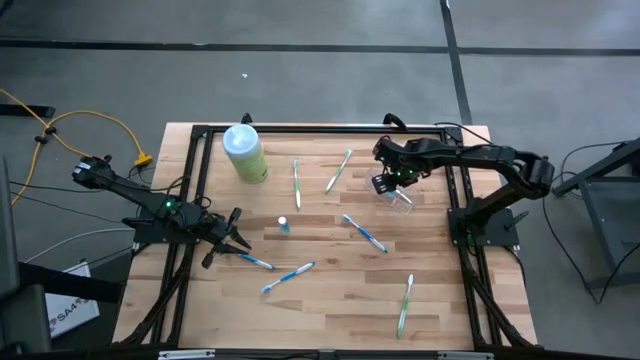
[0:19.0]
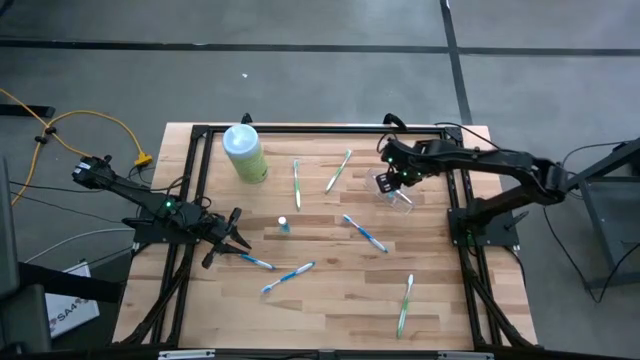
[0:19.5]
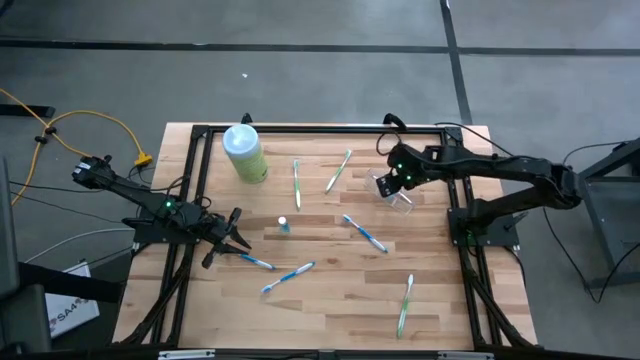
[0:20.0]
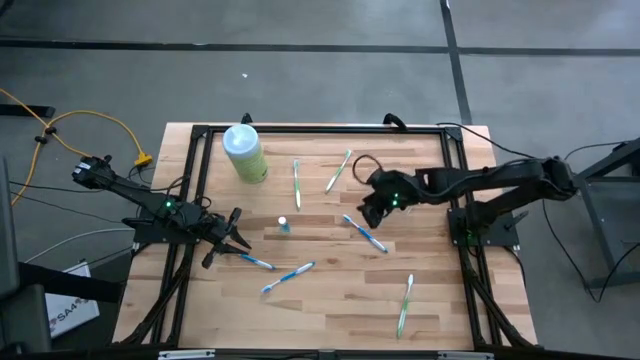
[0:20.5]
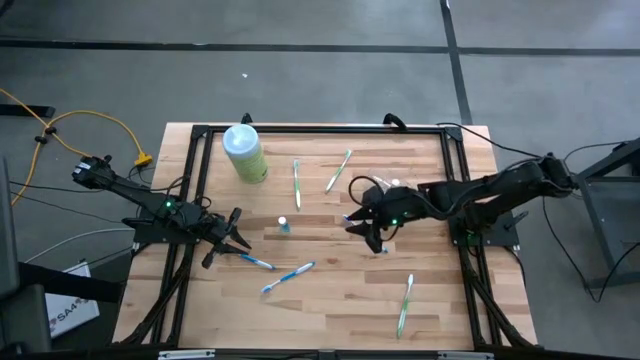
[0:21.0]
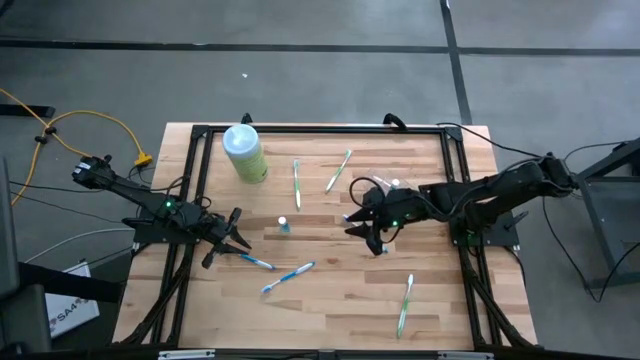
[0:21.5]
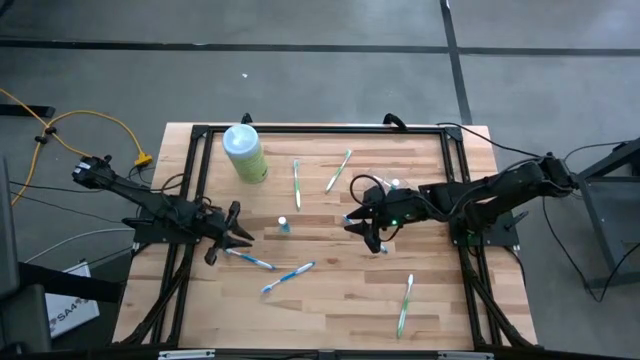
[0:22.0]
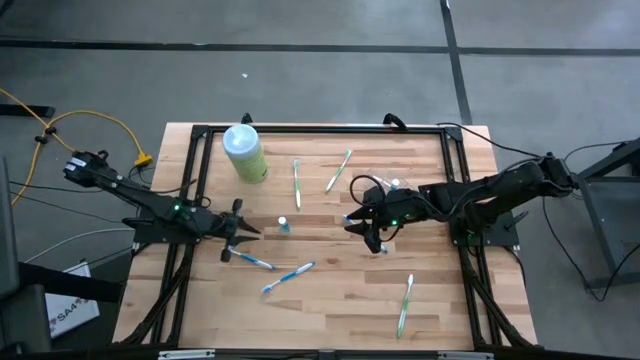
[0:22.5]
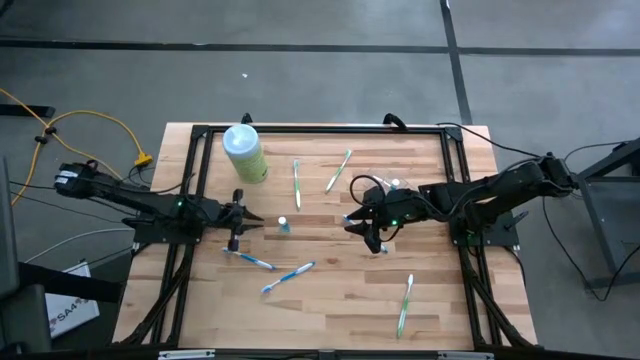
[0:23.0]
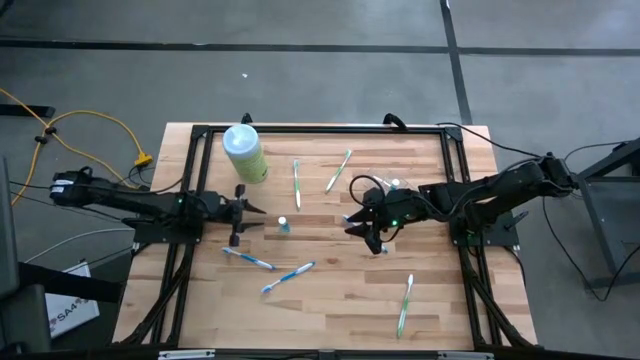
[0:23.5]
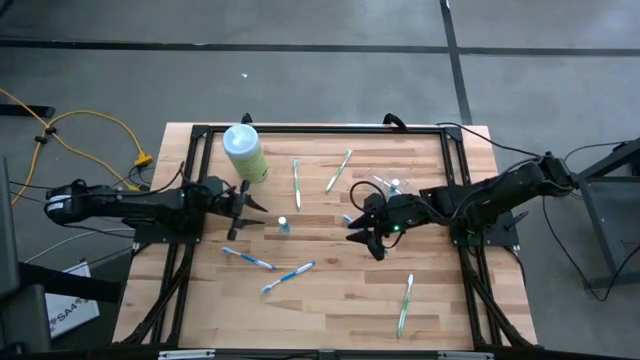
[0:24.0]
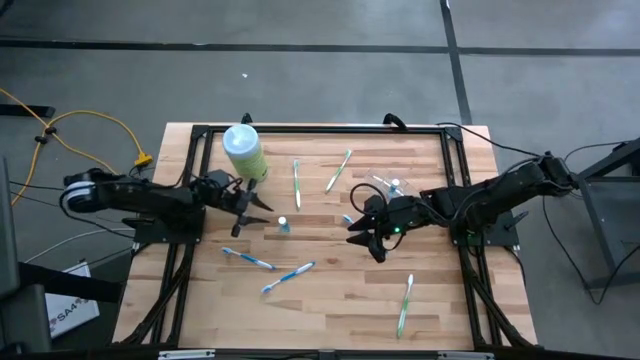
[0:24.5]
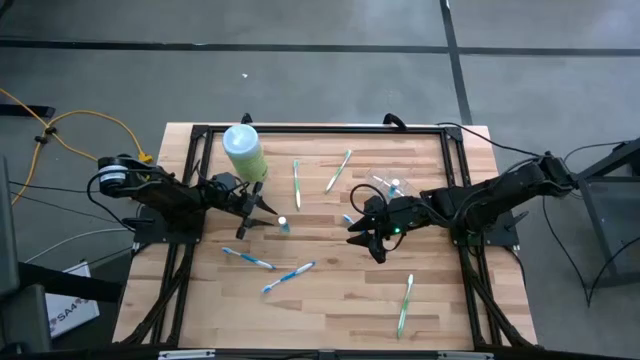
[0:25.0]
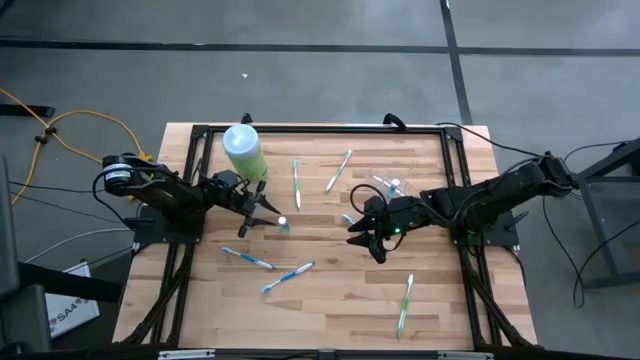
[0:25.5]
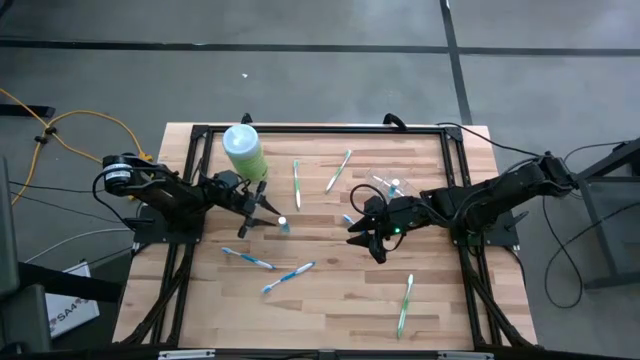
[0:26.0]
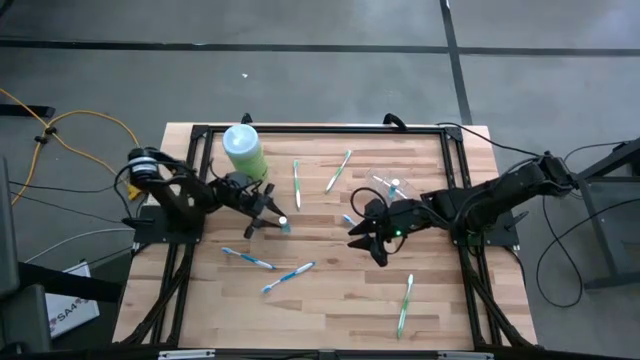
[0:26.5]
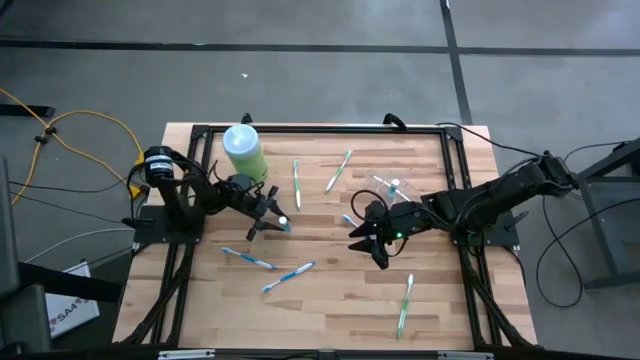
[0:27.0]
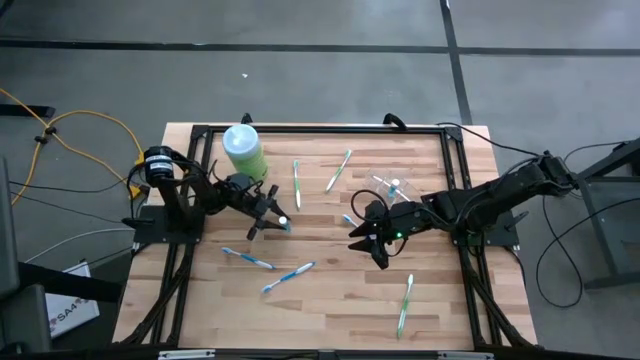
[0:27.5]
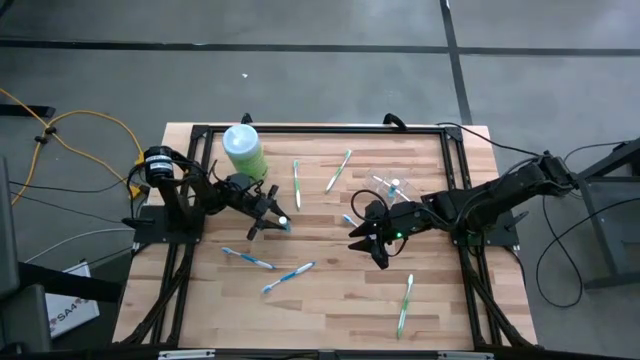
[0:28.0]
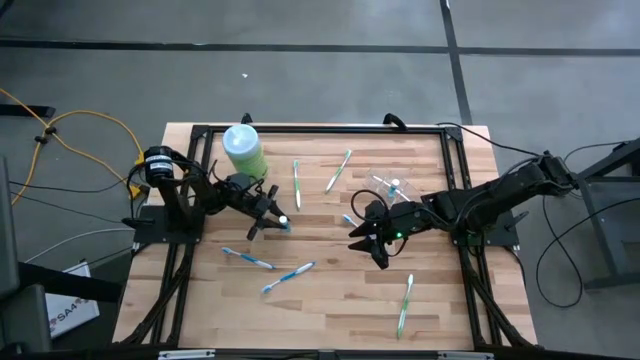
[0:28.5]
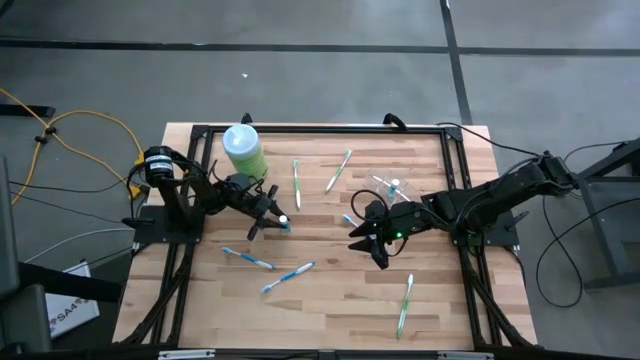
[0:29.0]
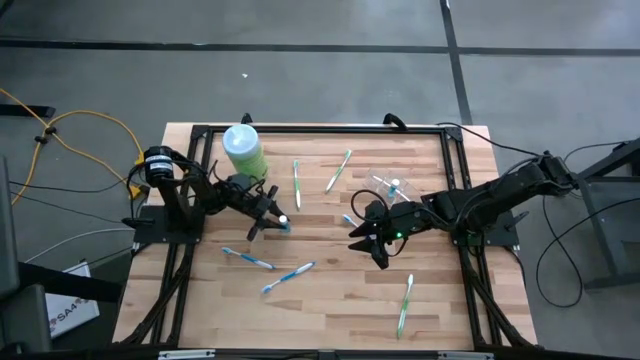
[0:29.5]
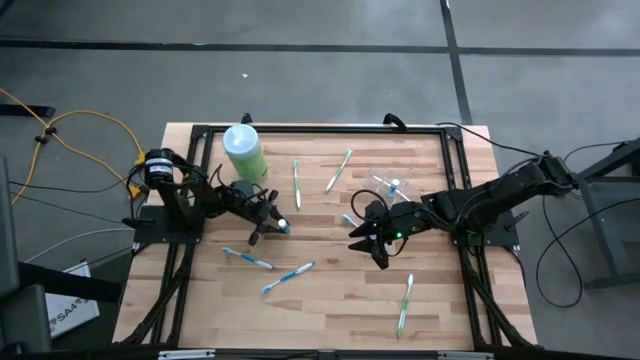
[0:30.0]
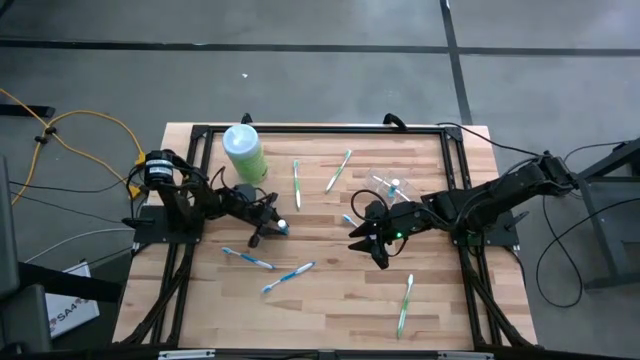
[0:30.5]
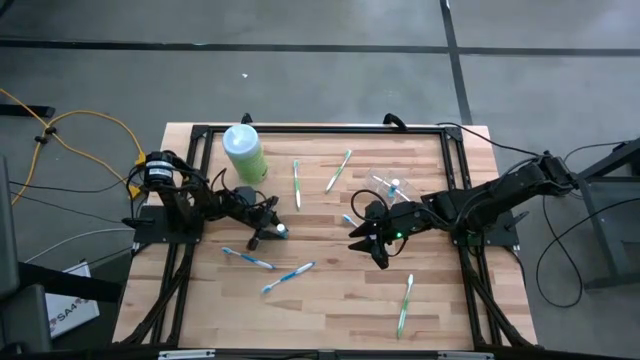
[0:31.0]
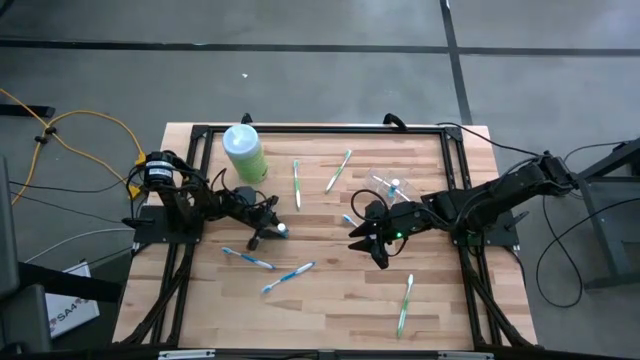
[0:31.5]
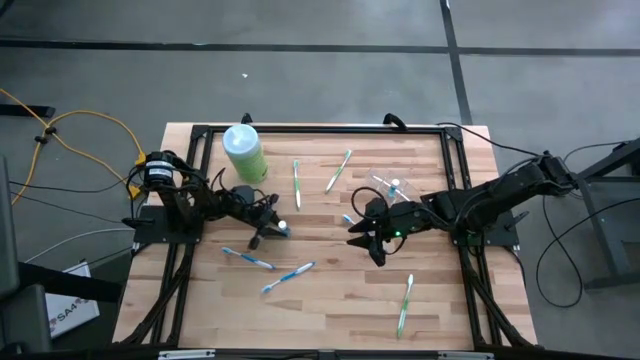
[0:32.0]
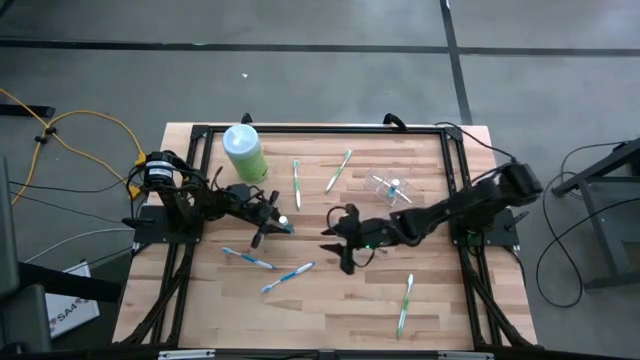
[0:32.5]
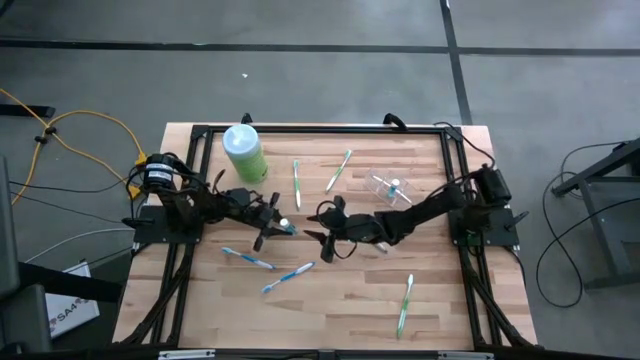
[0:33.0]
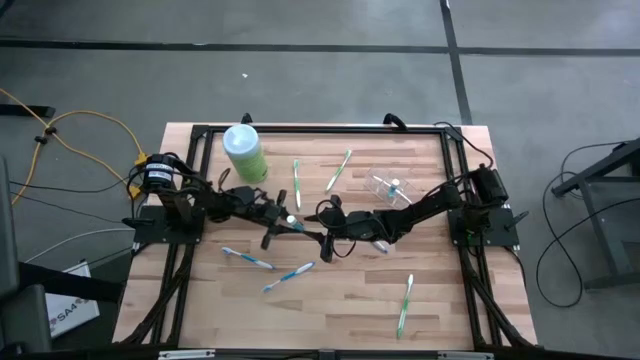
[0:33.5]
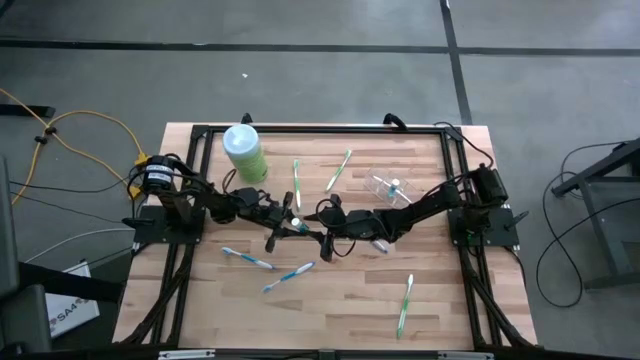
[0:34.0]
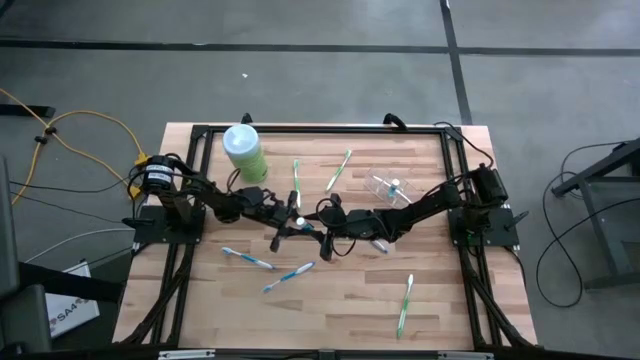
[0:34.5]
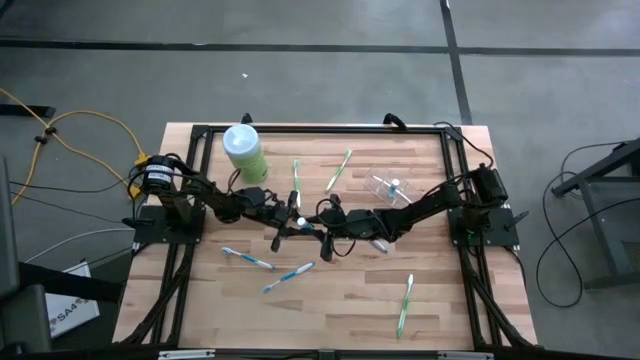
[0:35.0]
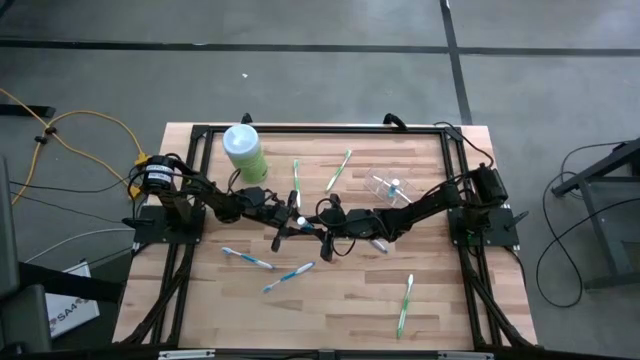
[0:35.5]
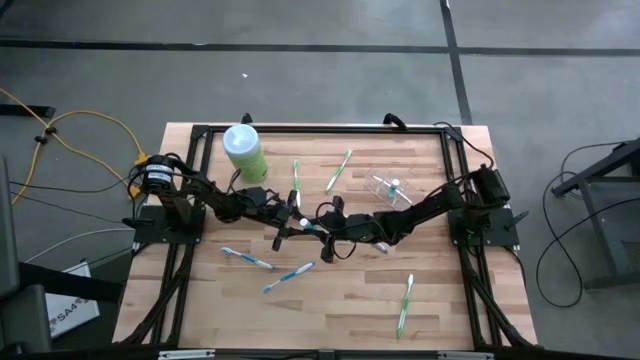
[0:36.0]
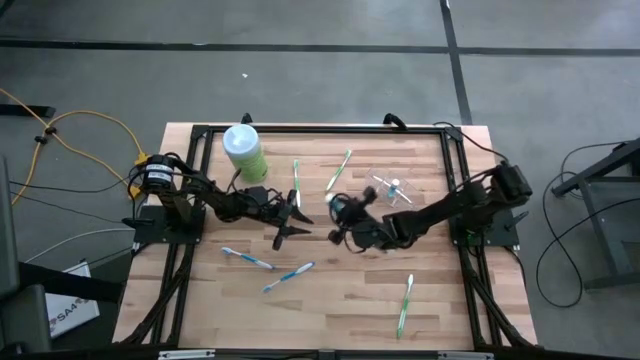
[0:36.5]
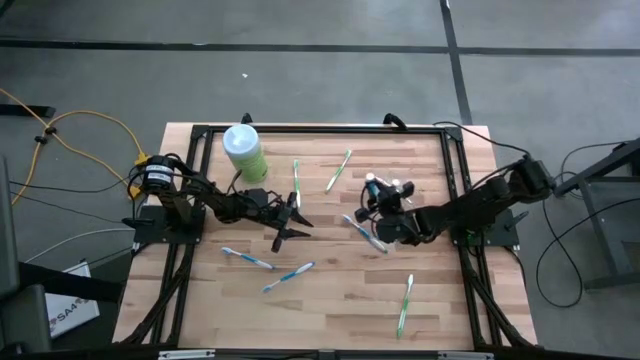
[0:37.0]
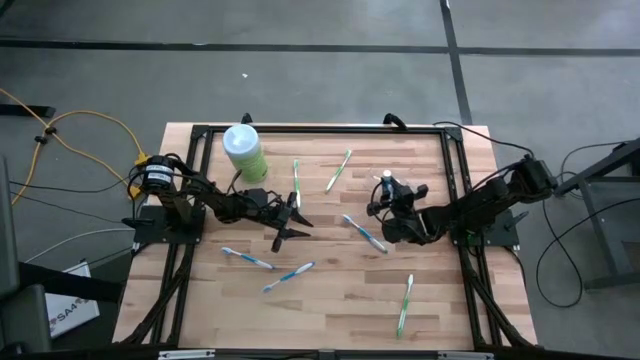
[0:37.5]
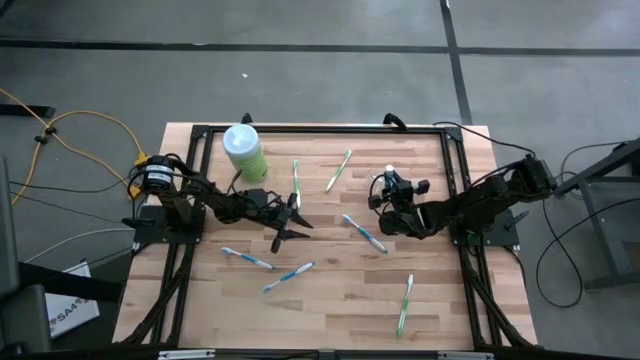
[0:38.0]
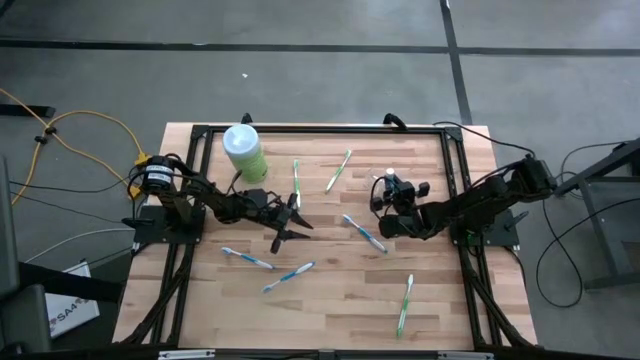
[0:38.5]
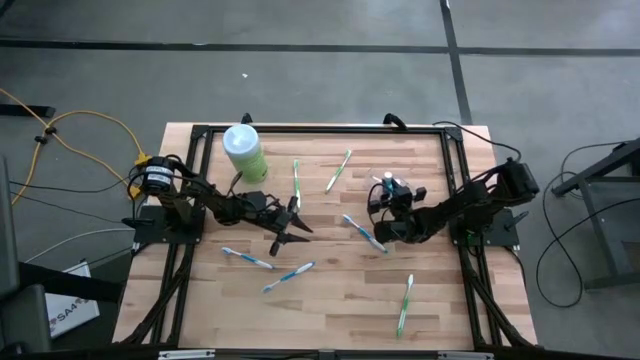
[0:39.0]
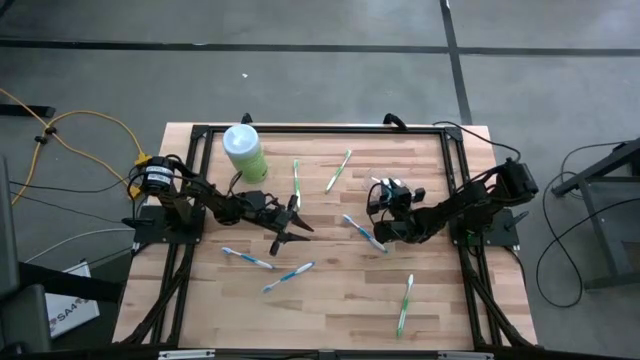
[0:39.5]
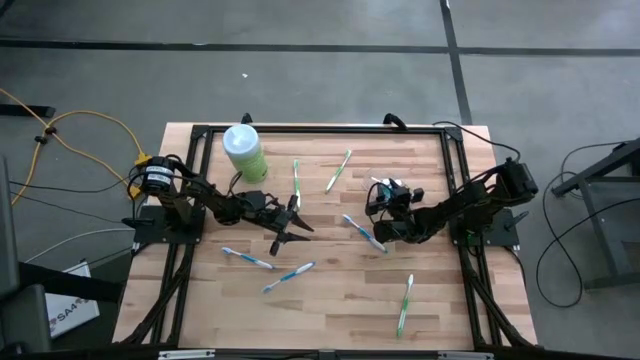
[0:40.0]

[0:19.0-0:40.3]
Task: Pick & Place toothbrushing station
Put the blue mouthwash into the middle of the transparent organizer
